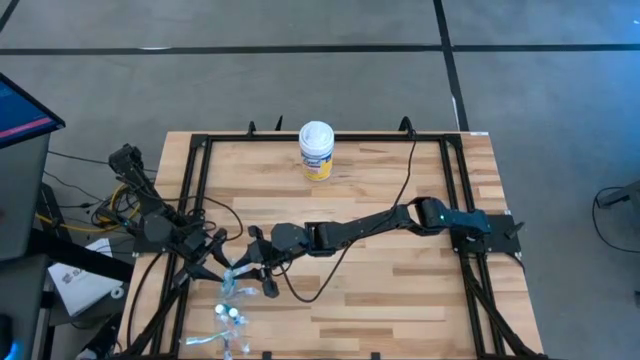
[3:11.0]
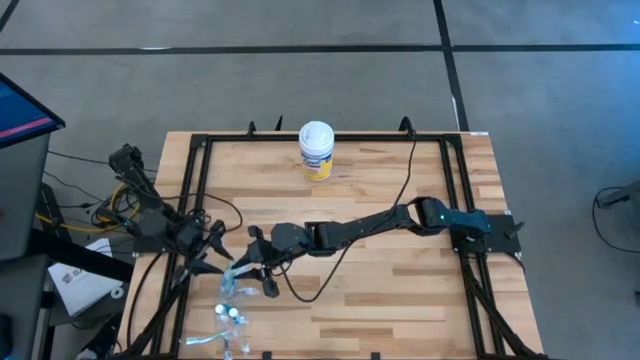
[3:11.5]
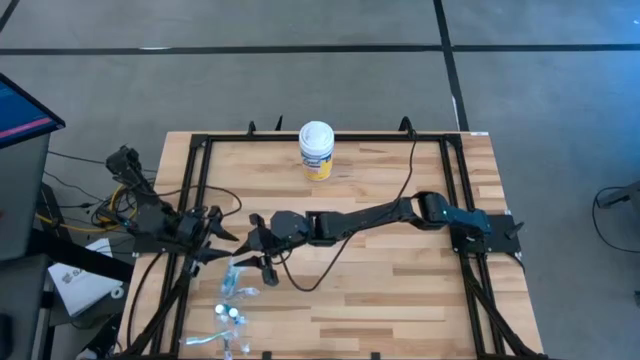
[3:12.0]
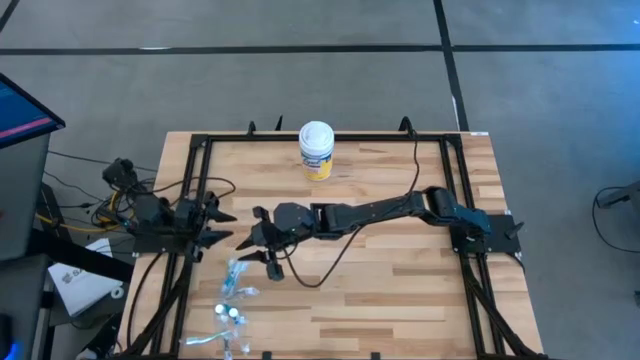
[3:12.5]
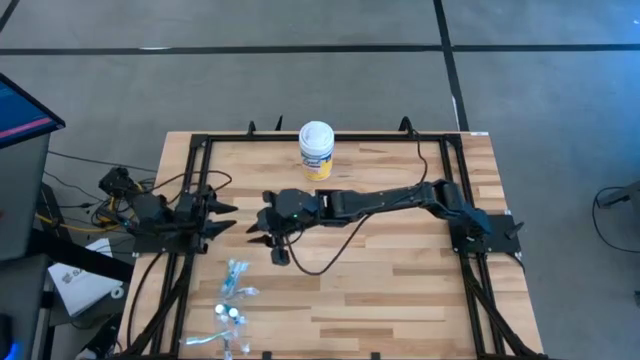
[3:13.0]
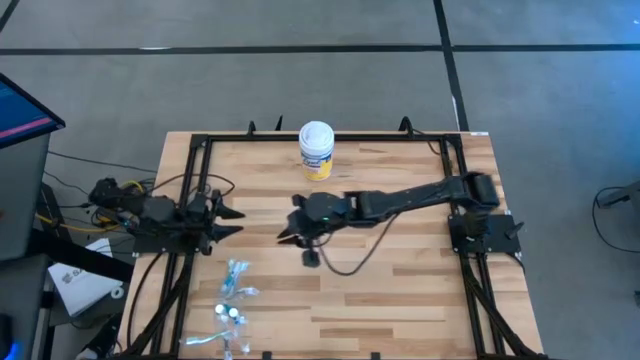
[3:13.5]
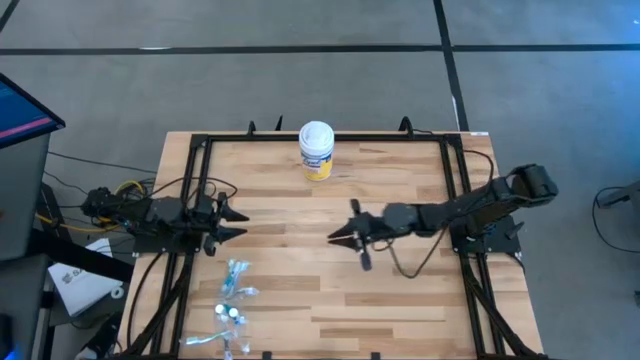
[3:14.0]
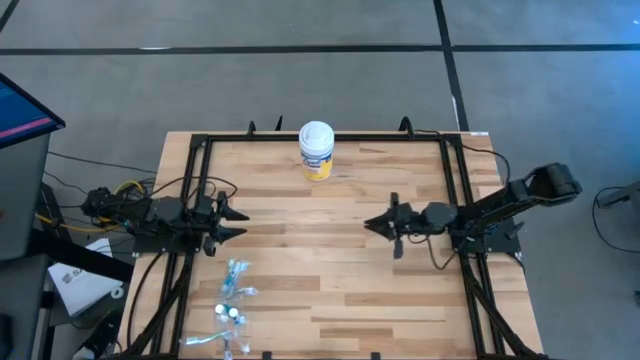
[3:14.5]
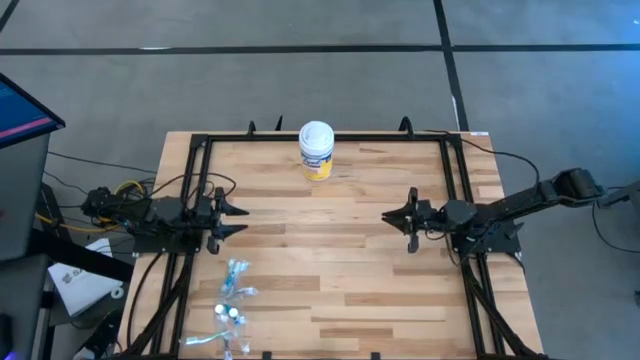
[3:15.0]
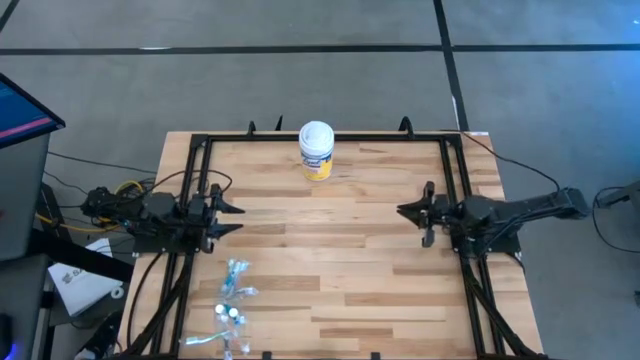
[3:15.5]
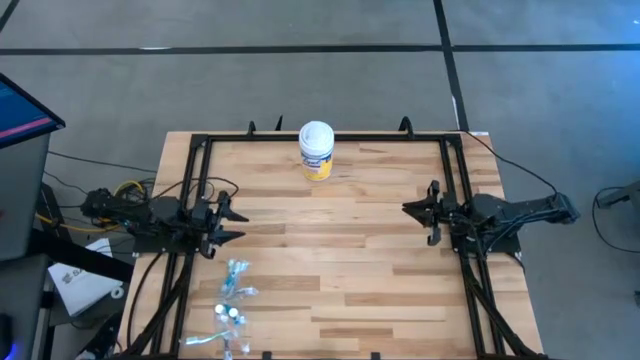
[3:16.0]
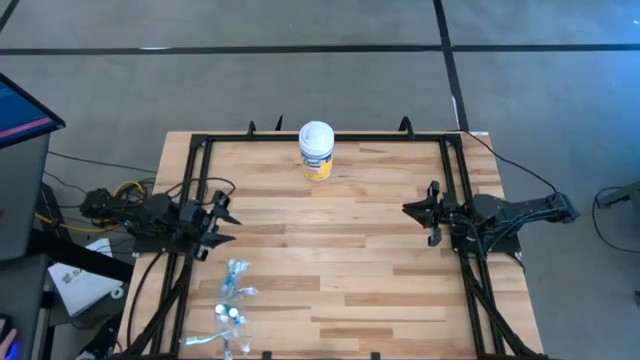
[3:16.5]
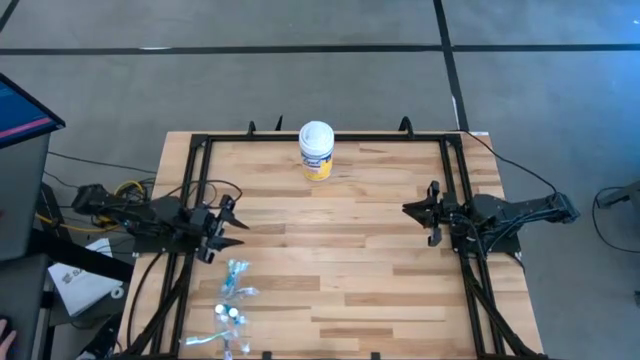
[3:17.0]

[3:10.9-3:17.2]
Task: Pick & Place toothbrushing station
Return to Home Position

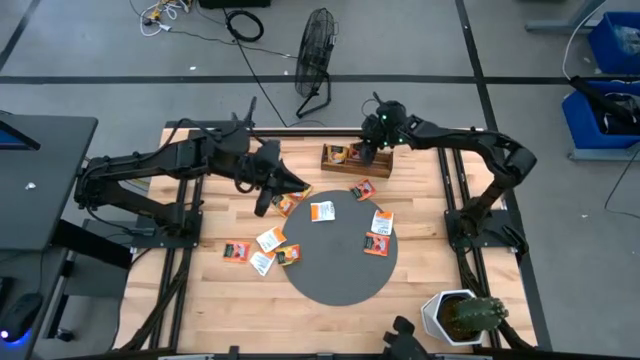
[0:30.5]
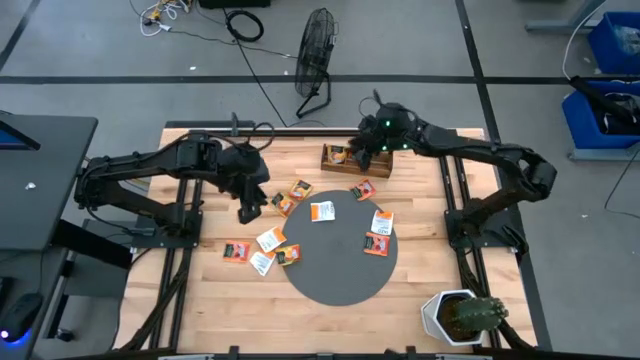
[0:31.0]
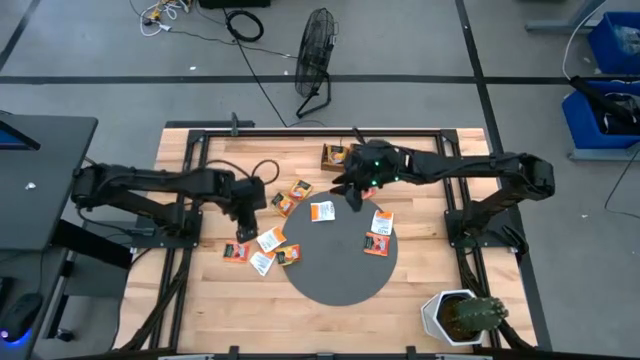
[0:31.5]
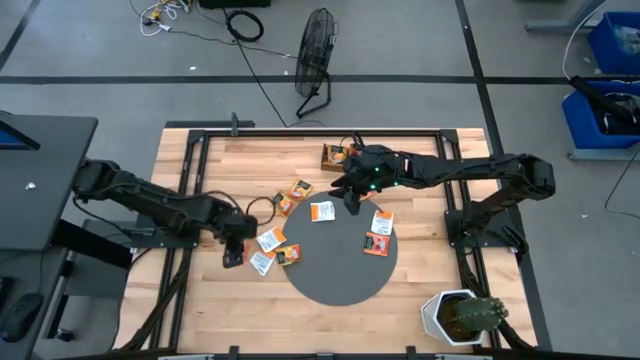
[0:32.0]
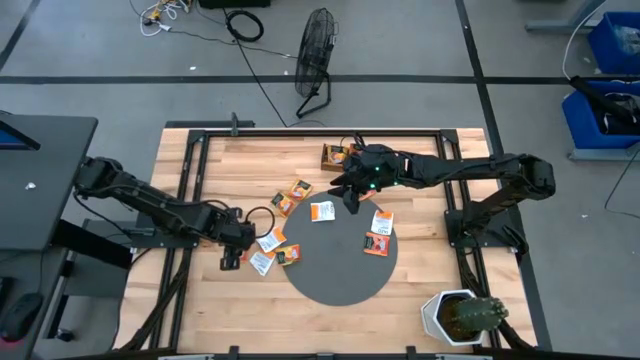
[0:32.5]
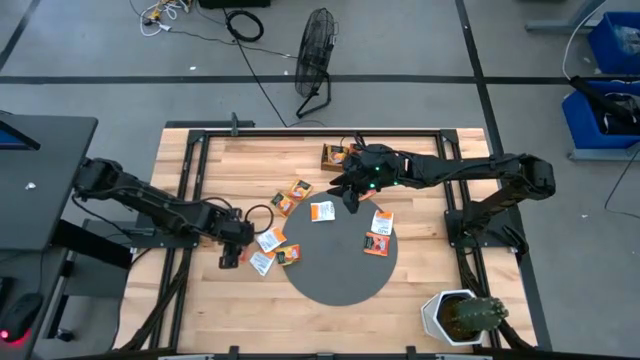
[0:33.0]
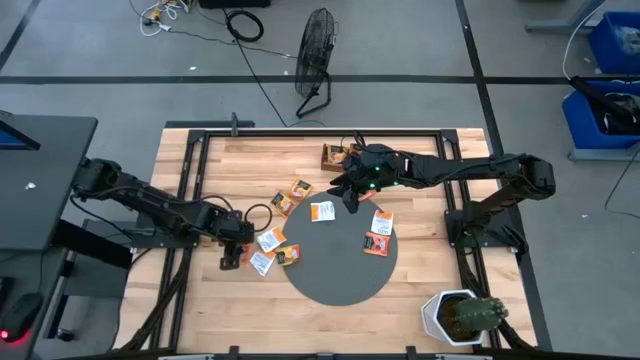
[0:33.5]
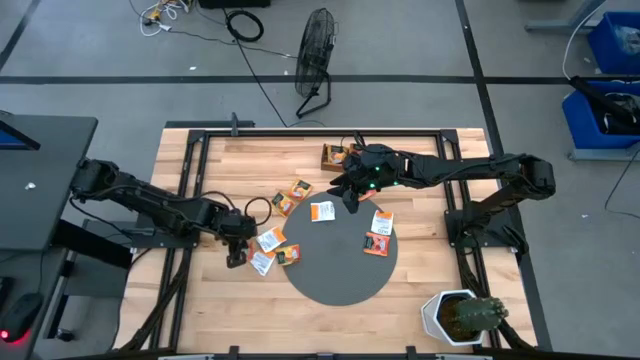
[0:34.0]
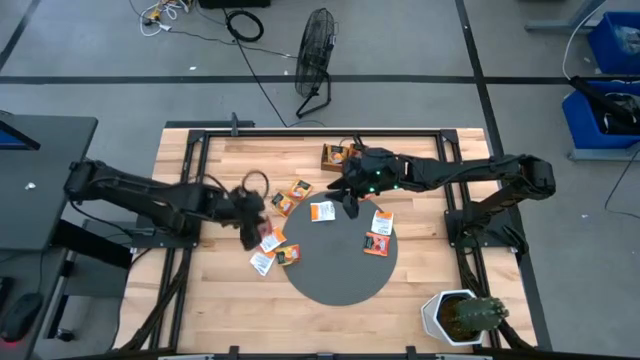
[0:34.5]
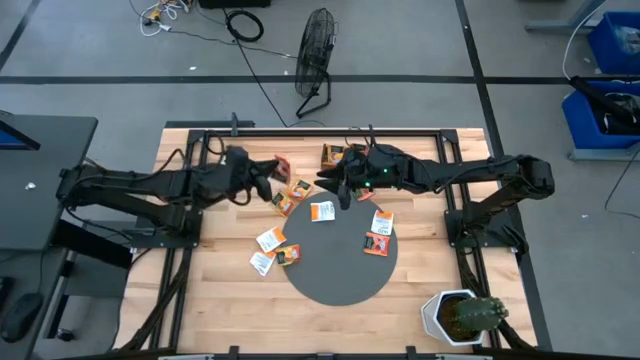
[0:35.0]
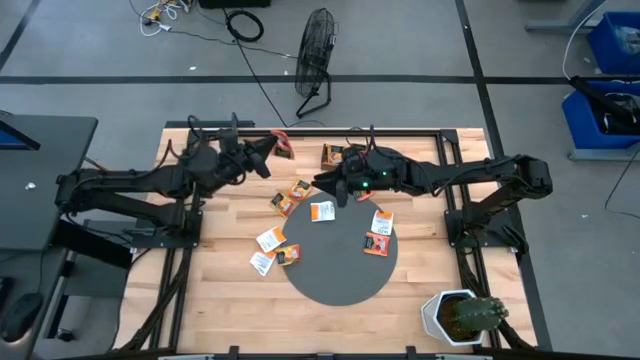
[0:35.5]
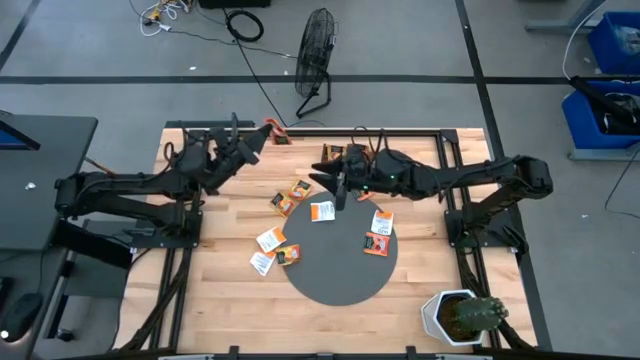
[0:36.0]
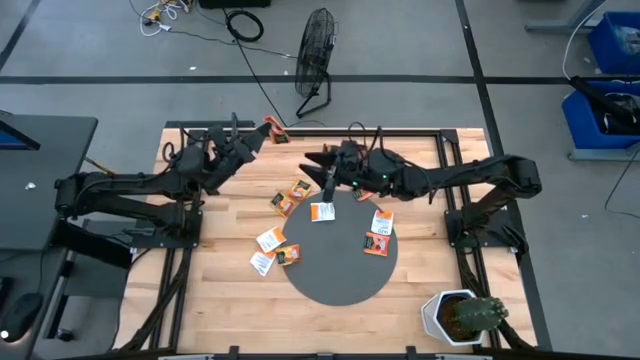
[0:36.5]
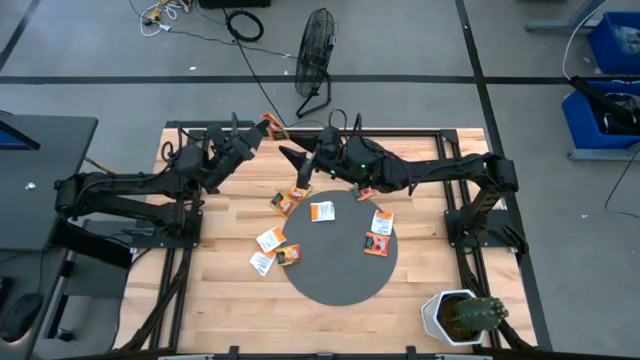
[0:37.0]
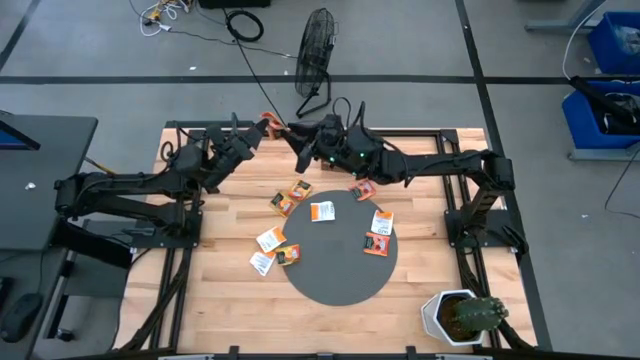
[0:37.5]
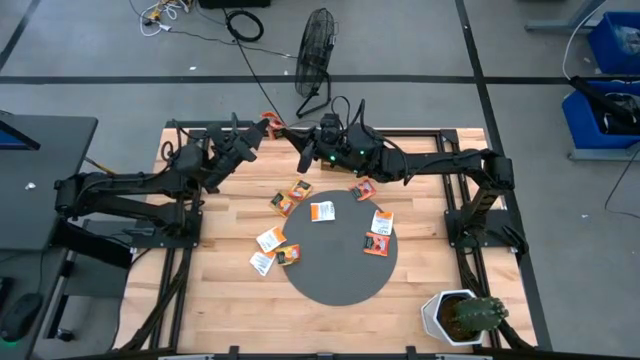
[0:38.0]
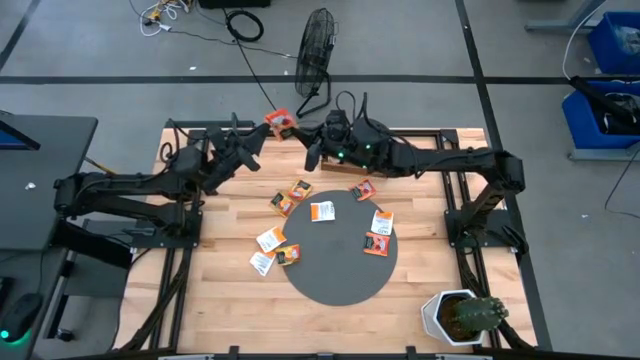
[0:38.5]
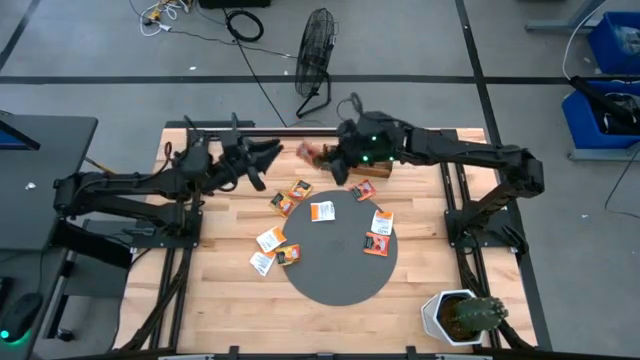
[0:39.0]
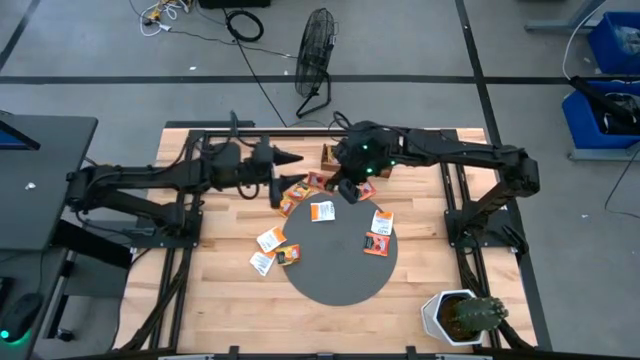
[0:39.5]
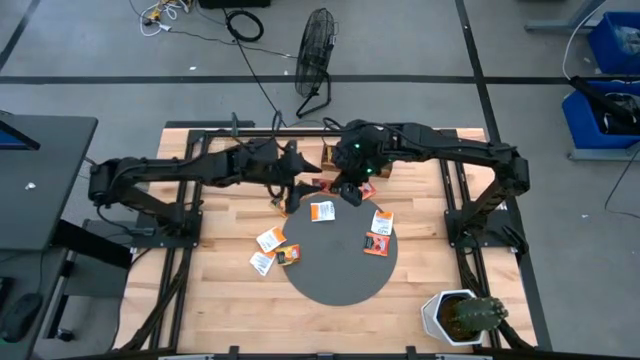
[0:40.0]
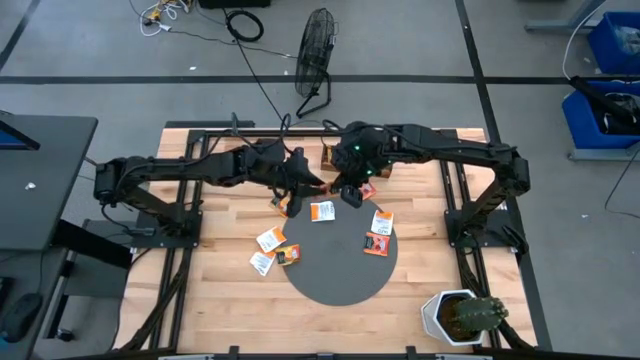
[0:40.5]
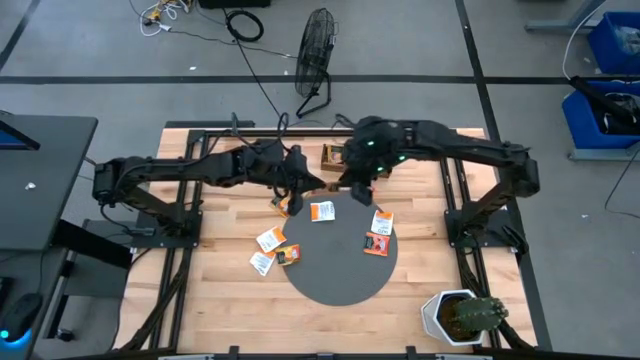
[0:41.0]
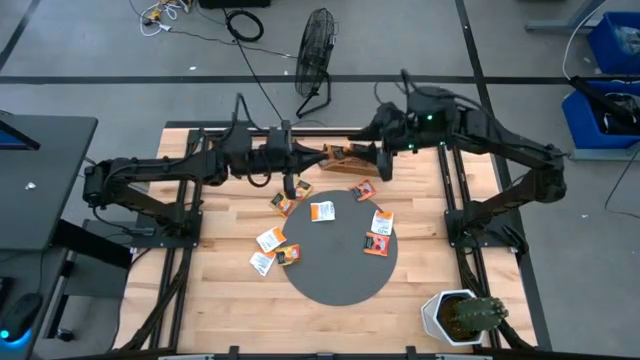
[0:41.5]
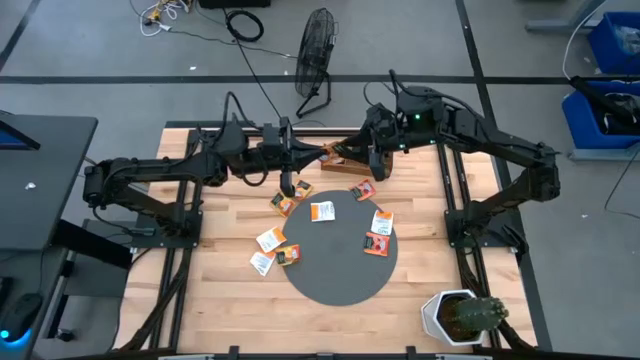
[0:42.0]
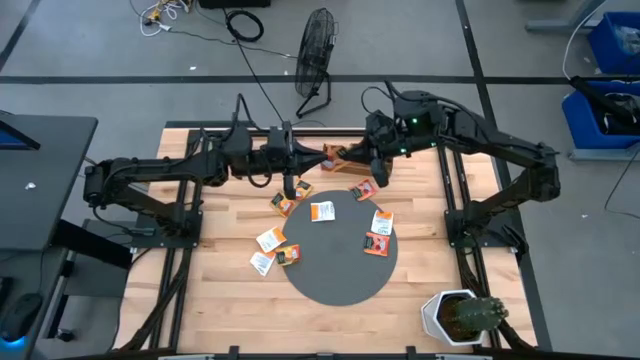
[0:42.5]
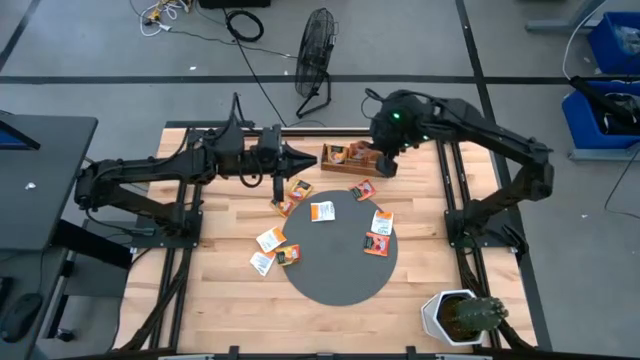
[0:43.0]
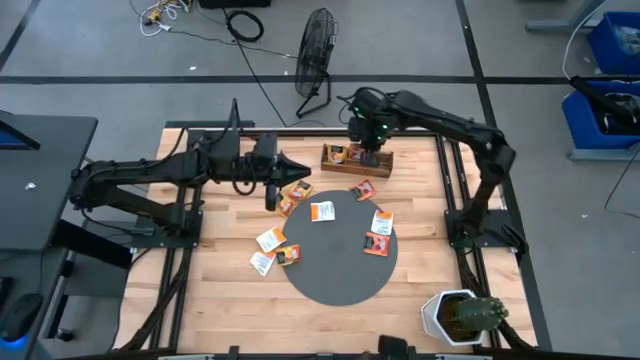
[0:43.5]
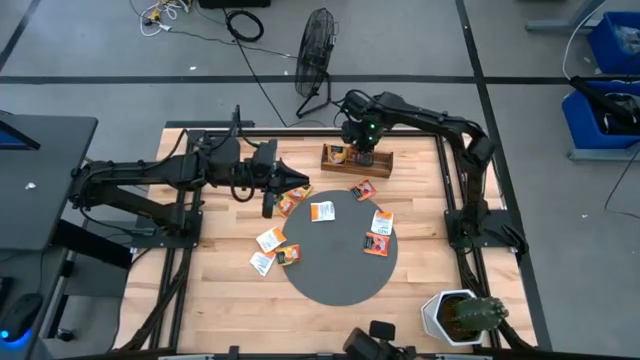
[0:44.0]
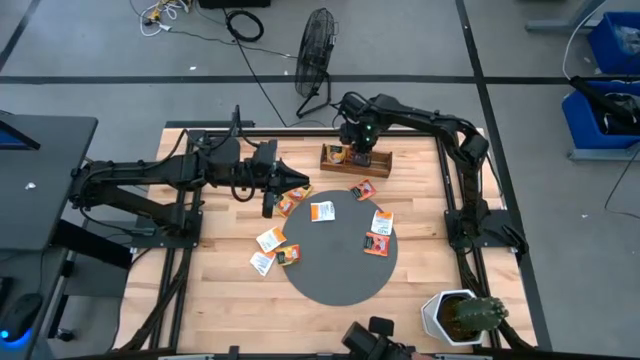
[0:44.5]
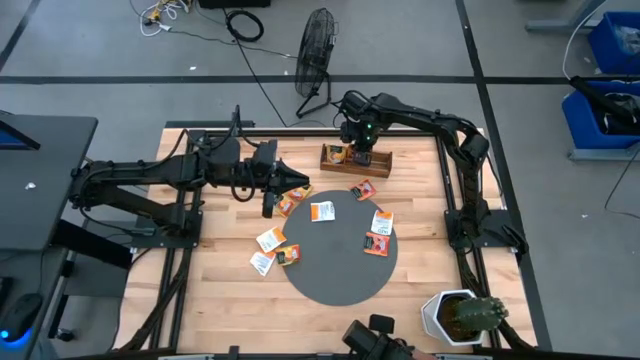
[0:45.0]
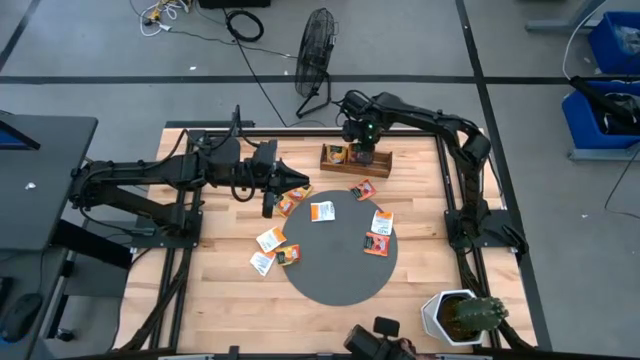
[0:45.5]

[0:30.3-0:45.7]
Task: Pick & Place Tea
Put the orange tea bag into the middle section of the wooden organizer
